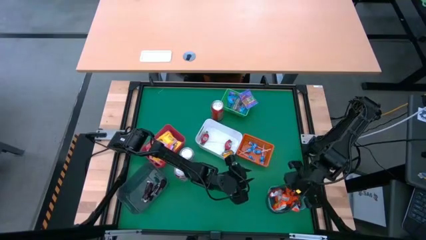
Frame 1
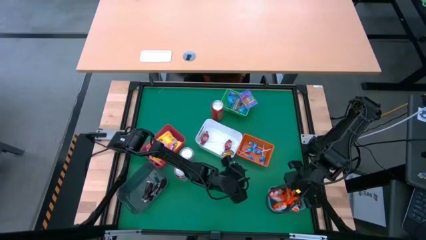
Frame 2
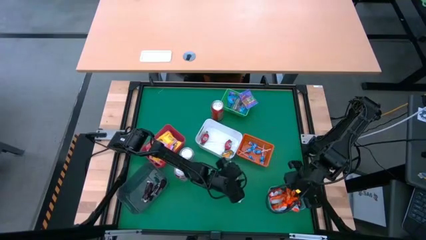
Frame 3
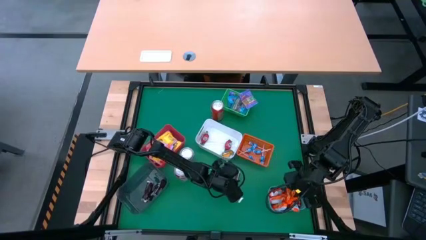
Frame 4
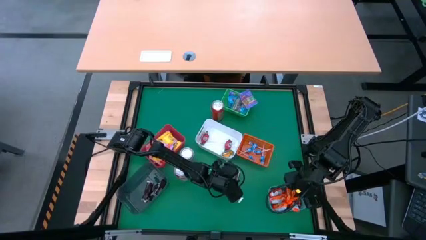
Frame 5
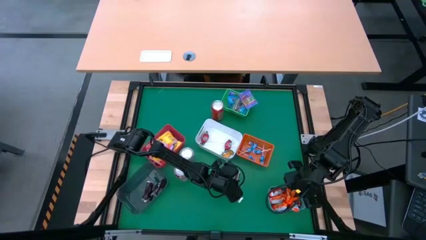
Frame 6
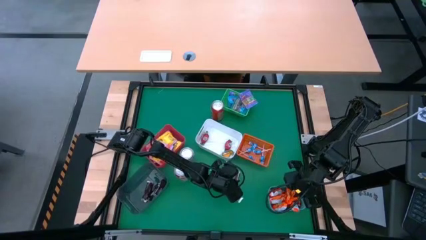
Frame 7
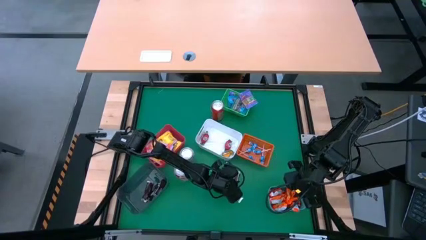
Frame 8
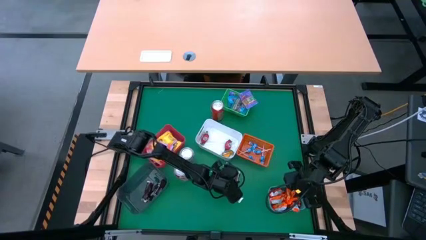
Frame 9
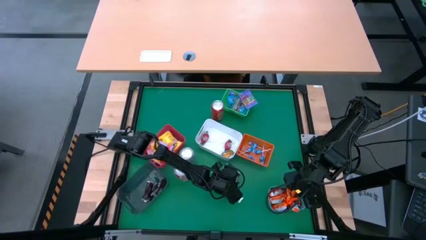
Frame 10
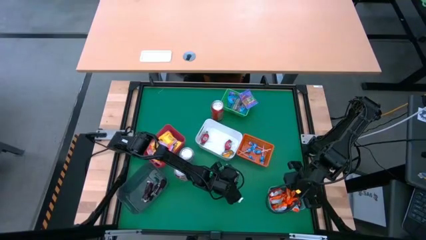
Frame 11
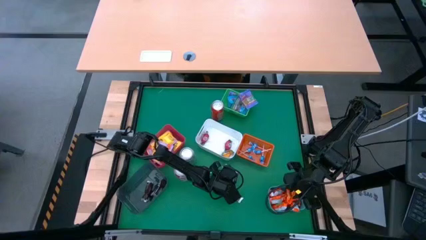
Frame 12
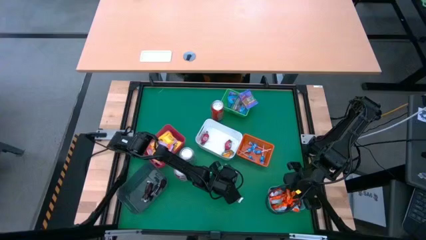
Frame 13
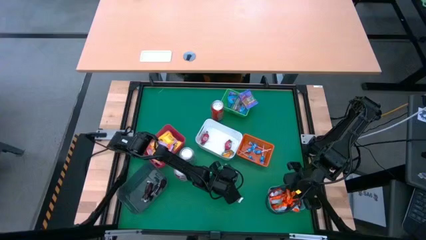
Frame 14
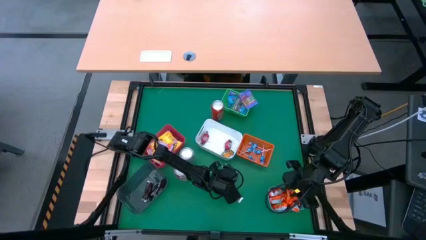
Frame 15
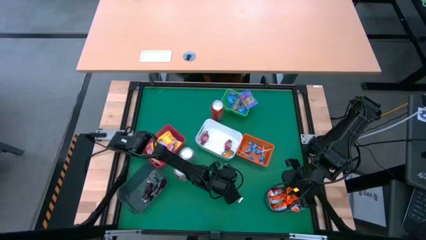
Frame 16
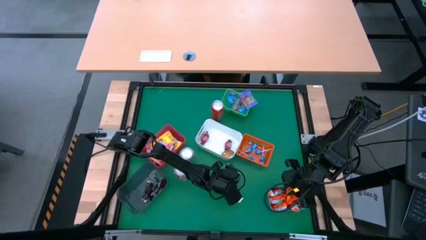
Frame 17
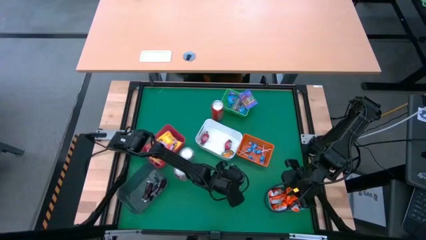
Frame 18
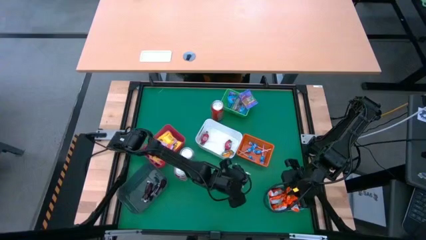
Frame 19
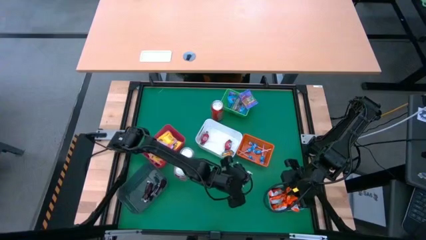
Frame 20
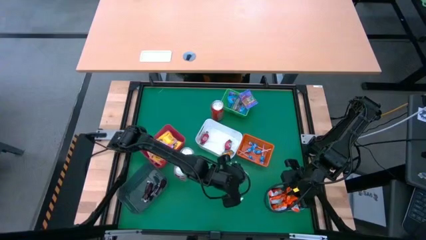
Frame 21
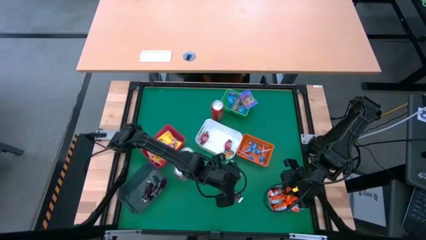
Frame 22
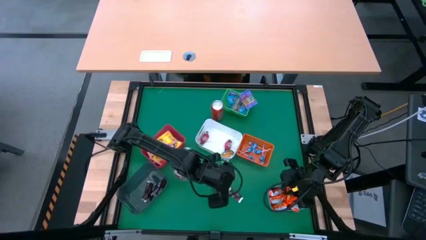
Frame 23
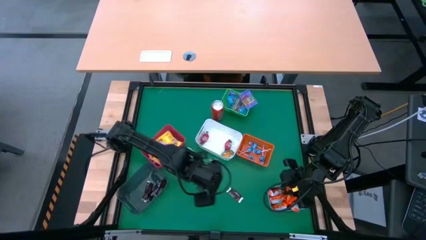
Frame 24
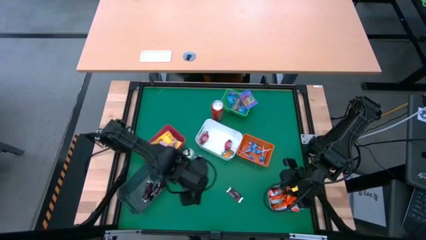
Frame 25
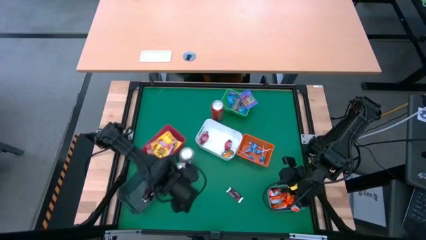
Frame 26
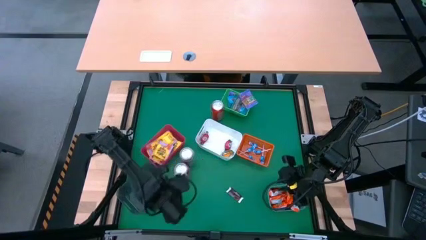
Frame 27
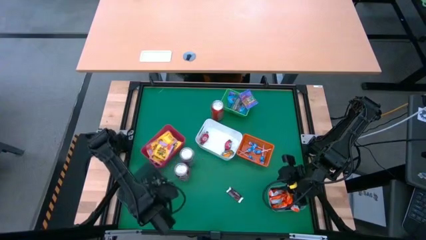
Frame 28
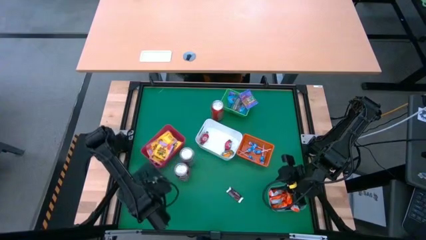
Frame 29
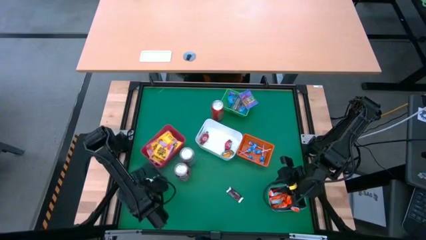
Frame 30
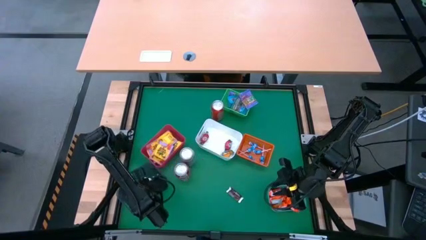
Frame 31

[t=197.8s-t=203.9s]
Task: Sort candy
Put the brown chocolate bar into the black bin

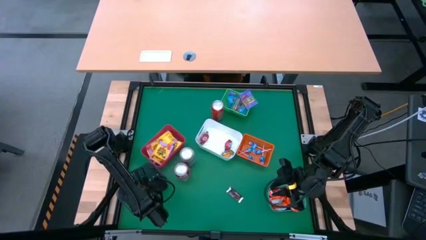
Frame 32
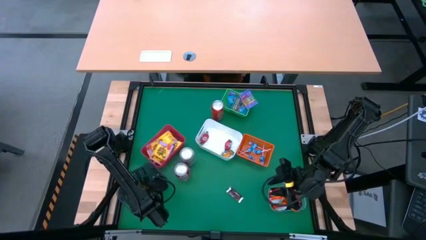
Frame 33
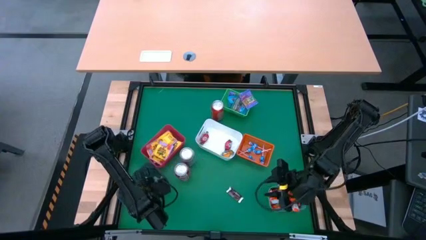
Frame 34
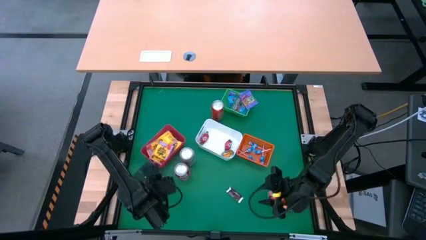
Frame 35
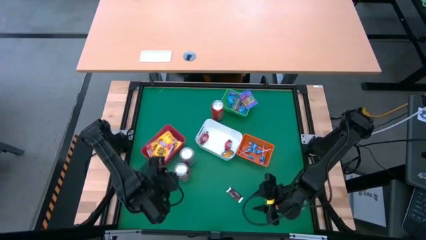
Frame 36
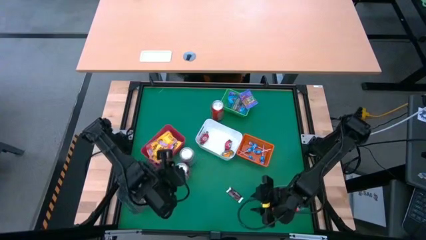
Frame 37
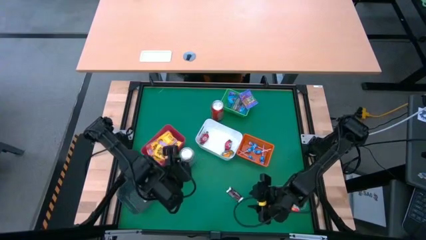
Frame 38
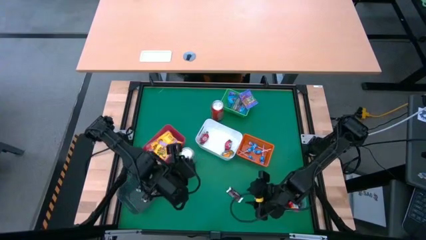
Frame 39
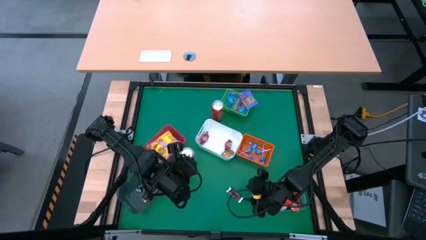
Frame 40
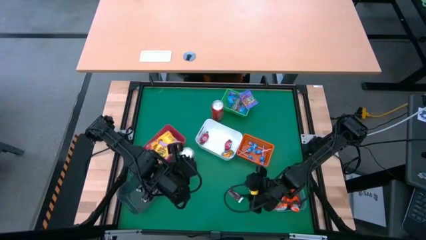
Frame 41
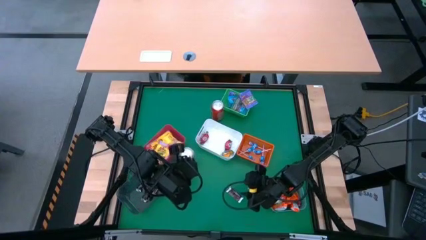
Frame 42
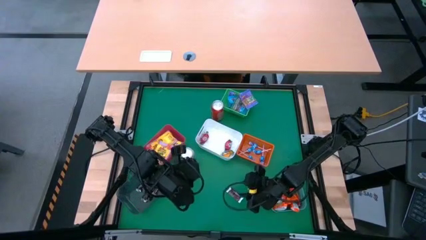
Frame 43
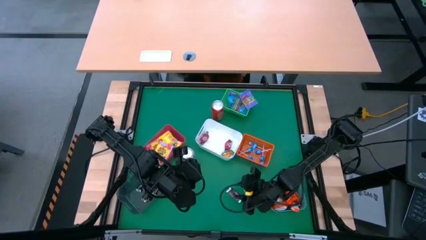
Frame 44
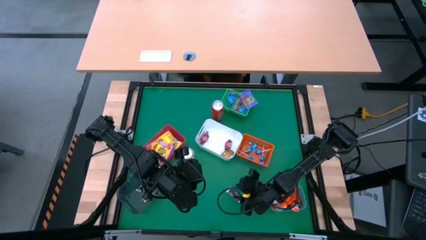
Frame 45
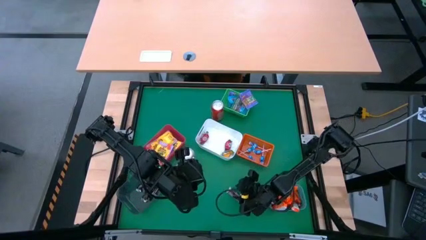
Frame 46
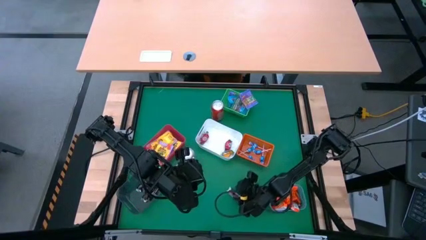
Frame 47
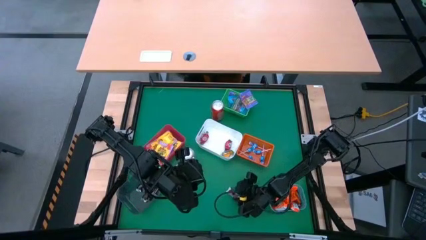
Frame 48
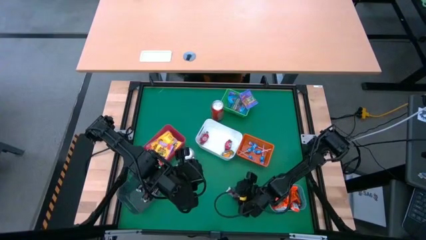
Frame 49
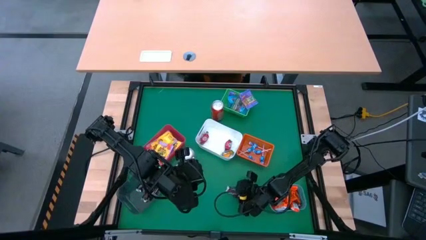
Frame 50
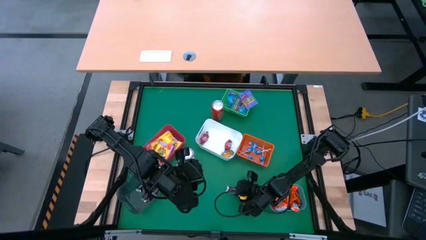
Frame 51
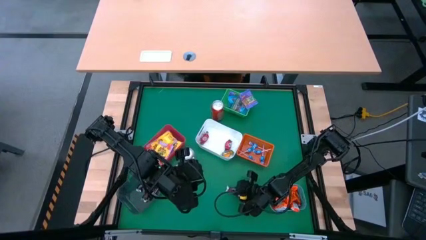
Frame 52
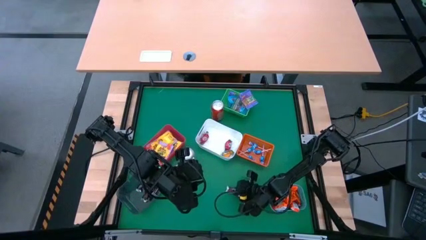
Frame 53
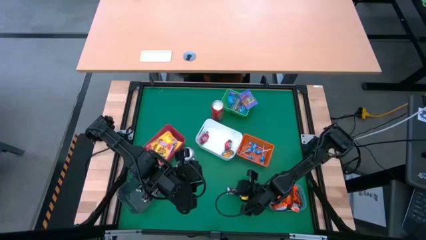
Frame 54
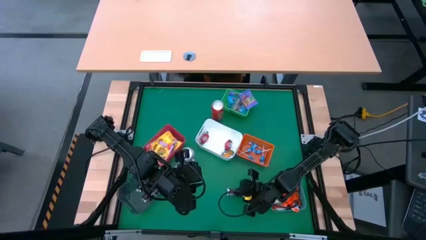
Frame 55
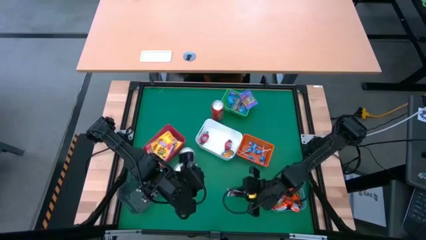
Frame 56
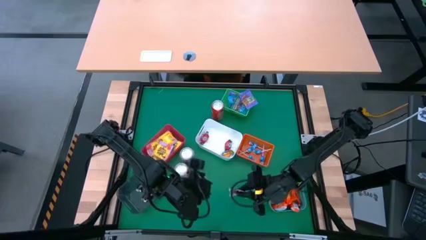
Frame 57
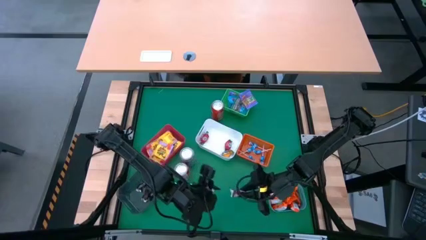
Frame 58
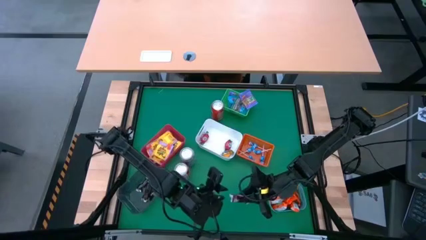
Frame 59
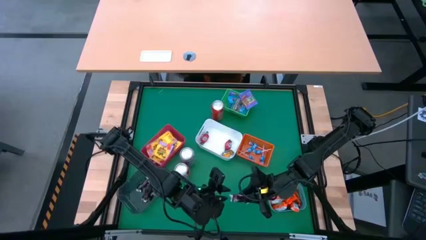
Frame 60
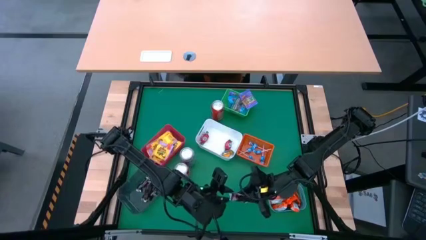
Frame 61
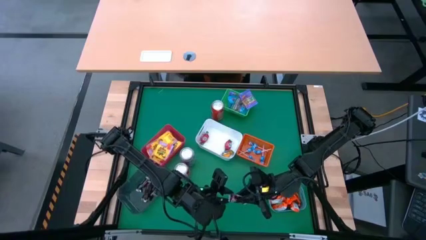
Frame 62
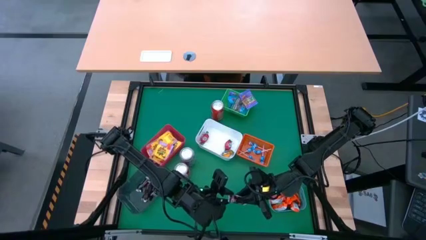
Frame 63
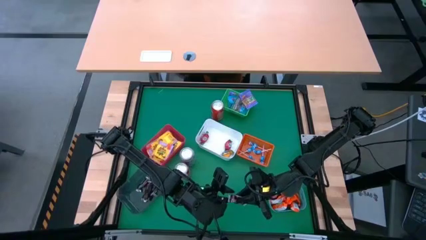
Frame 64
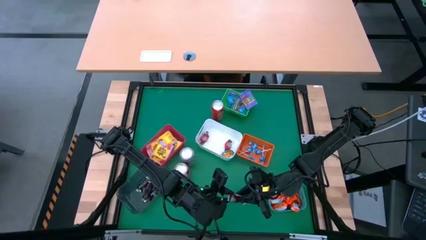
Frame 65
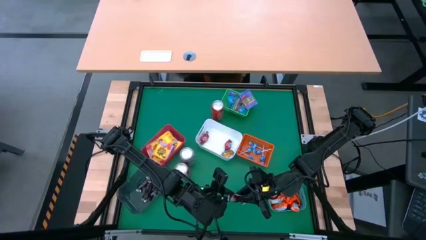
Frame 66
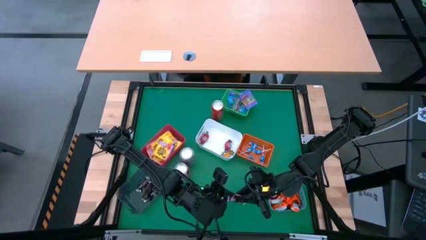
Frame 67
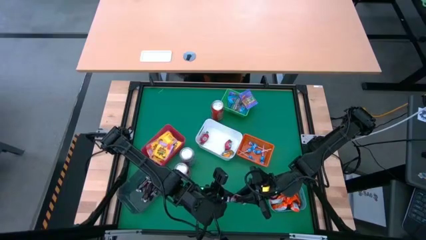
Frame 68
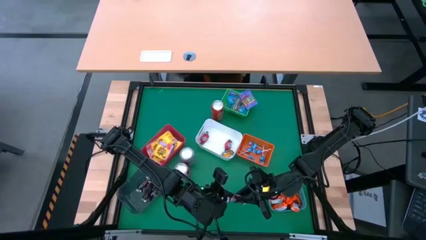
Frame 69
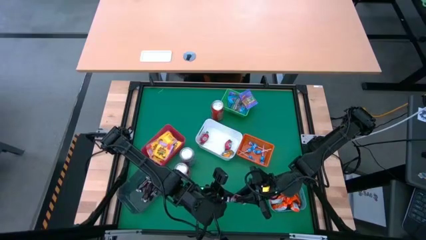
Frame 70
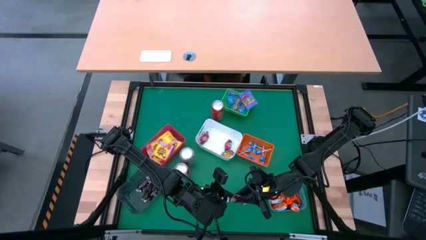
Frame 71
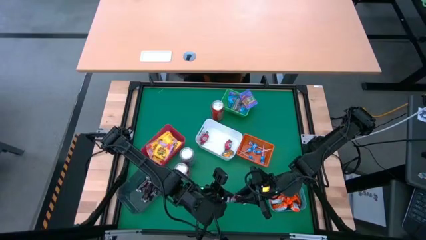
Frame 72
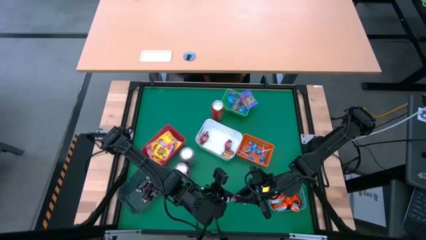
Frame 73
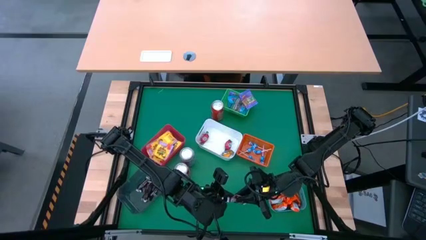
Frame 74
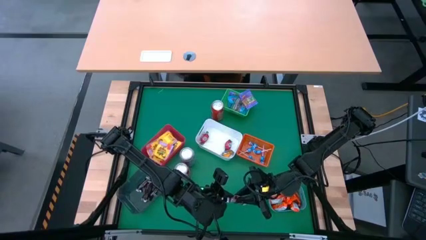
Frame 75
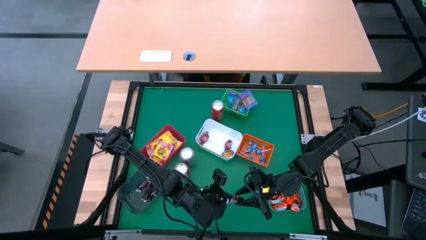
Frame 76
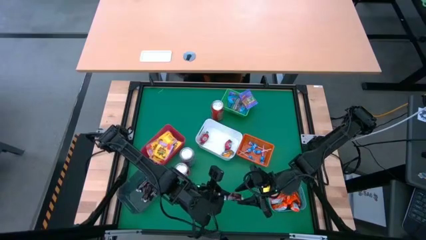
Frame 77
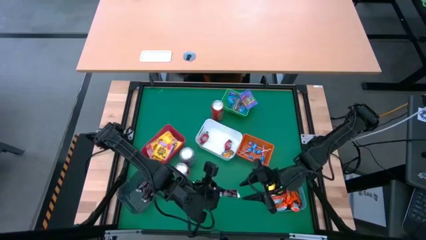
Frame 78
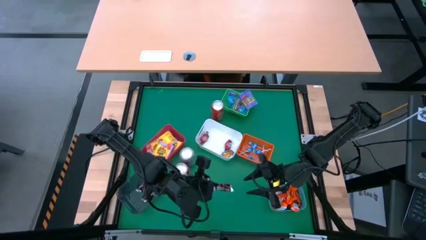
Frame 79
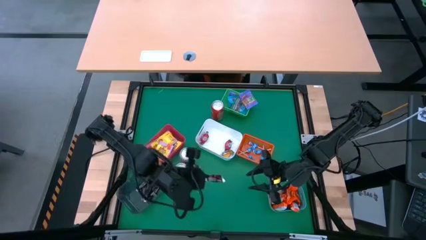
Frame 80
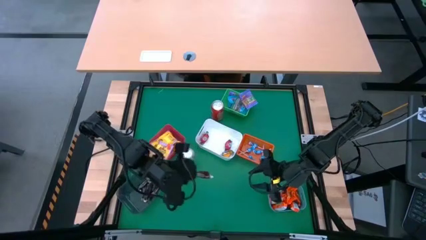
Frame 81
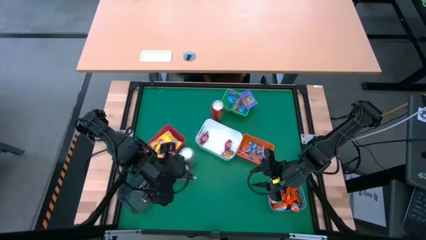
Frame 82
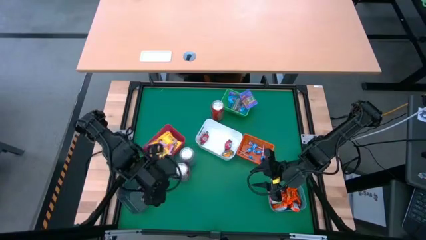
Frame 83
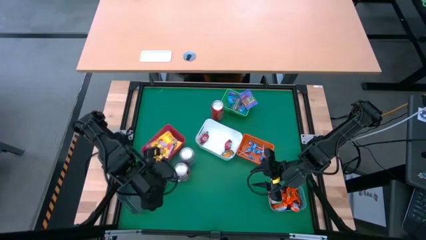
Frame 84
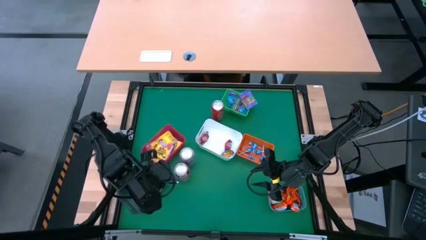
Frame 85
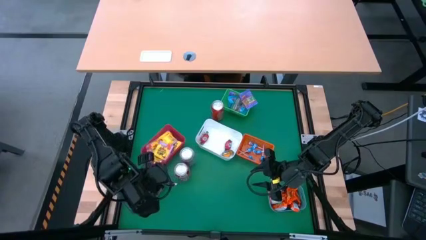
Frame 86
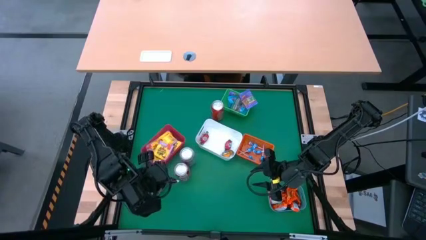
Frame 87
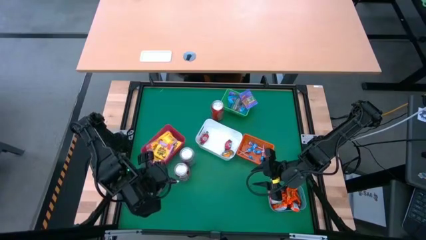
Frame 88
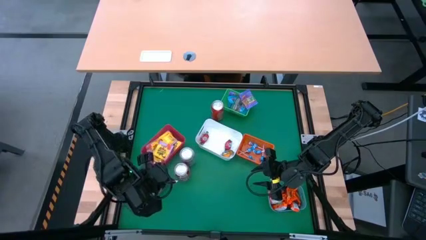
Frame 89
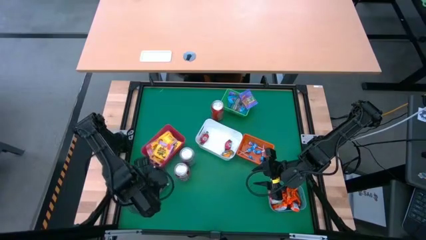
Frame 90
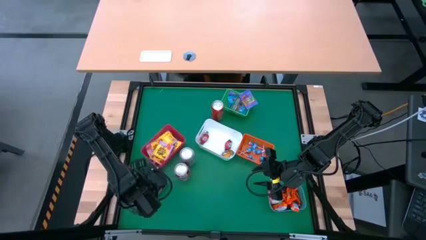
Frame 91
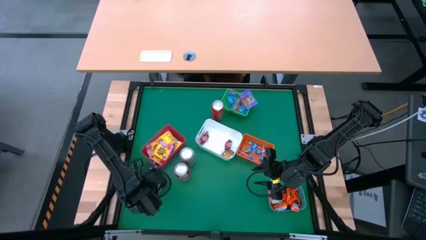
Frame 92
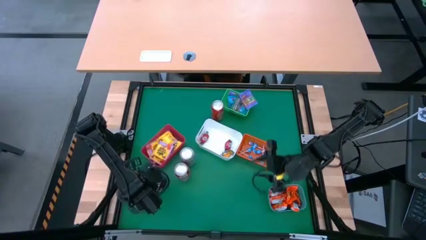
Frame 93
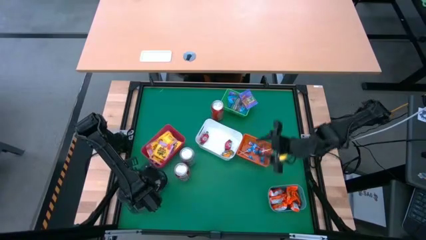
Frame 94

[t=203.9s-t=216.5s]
Put the brown chocolate bar into the black bin
